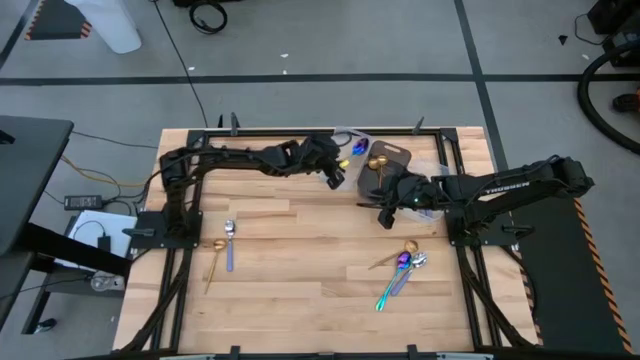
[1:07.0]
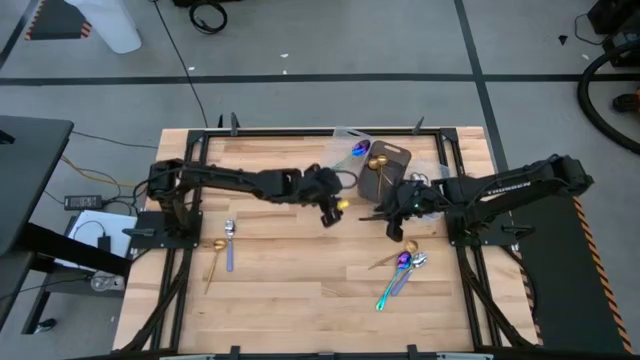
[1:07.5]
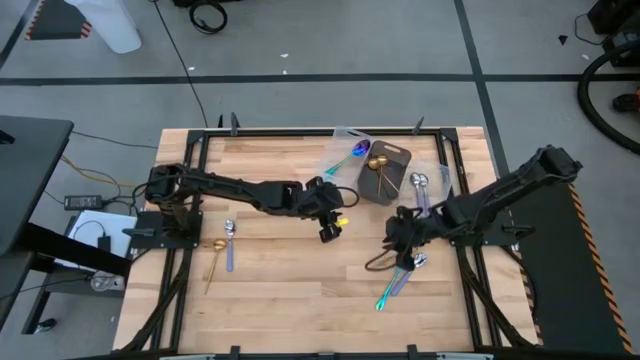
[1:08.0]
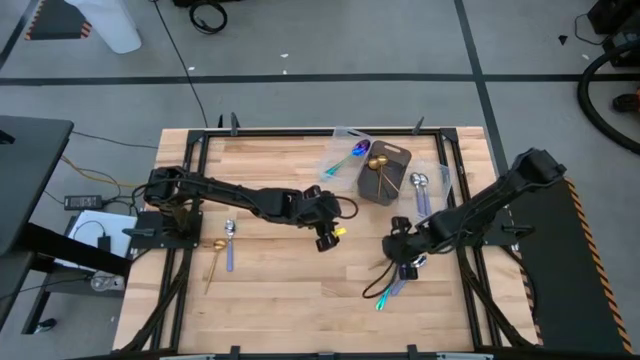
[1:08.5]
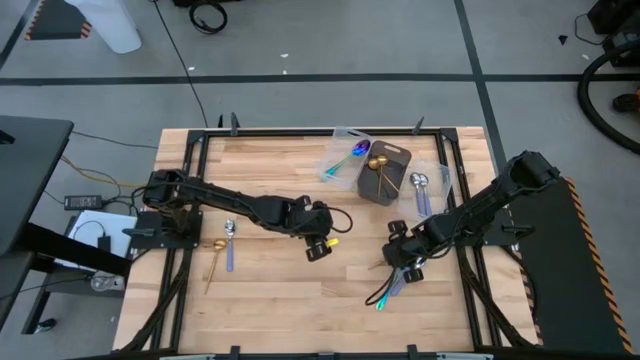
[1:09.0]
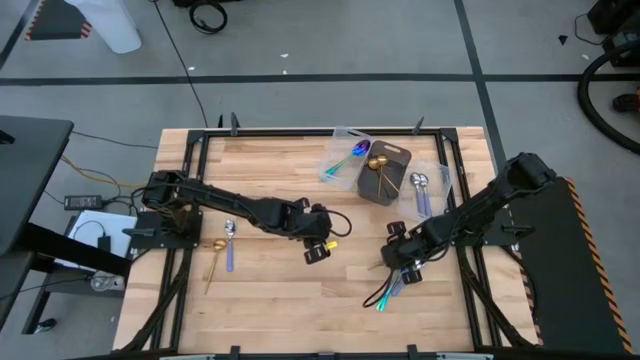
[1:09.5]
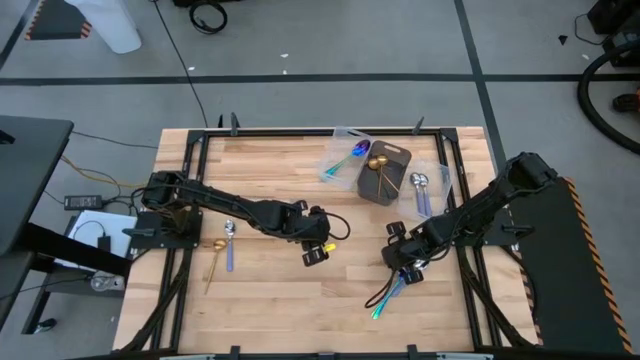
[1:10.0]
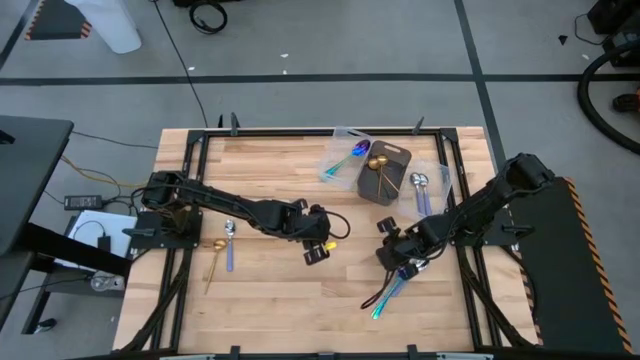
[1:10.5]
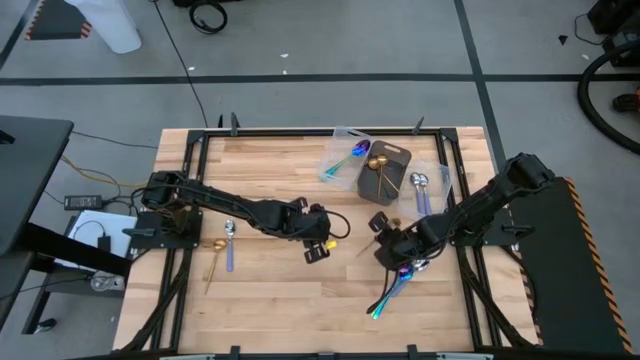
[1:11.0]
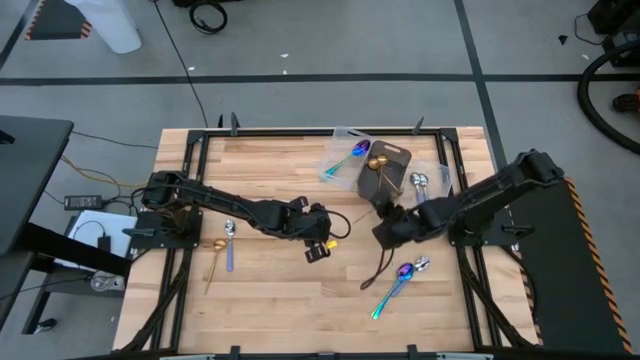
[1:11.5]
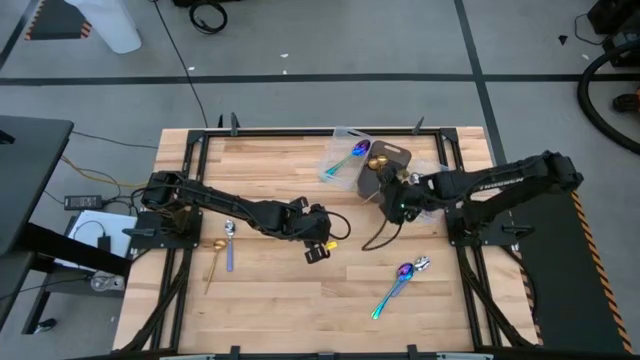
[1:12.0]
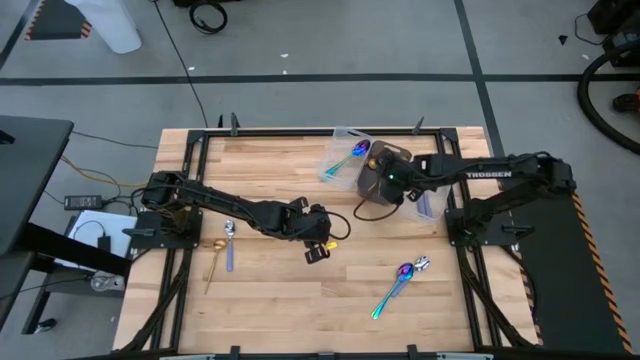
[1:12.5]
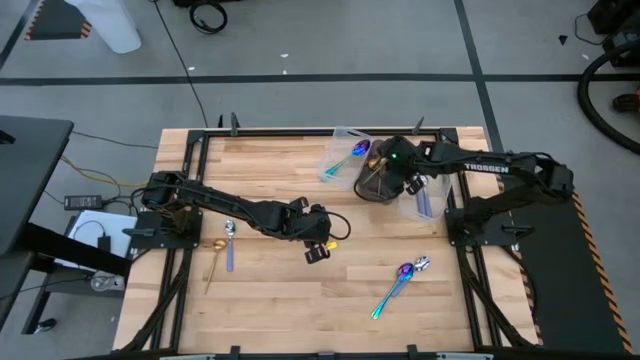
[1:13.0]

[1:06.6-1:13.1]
Task: Sort silverware by color (type)
Put the gold spoon into the black bin

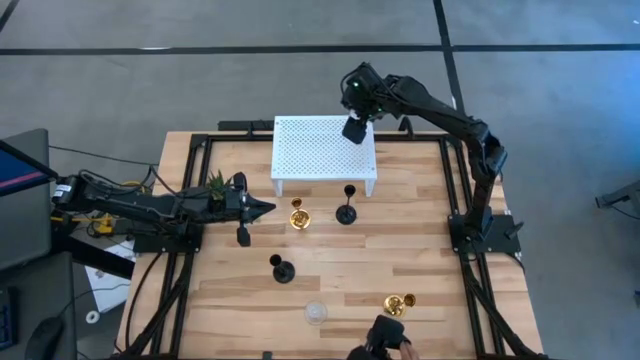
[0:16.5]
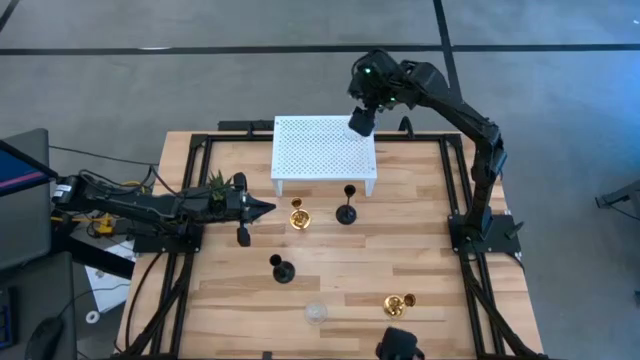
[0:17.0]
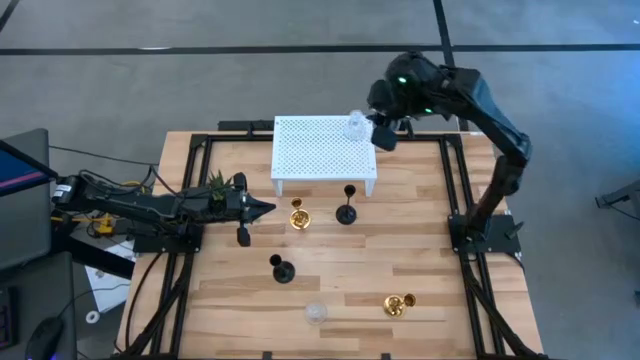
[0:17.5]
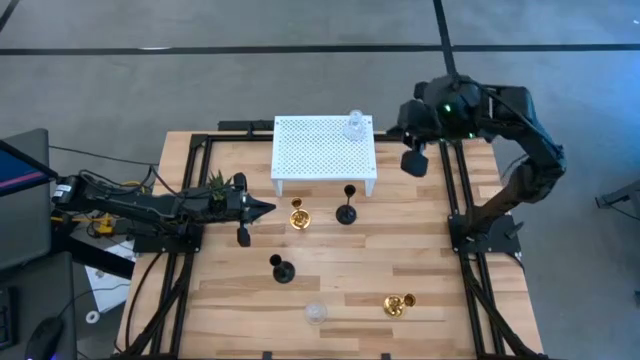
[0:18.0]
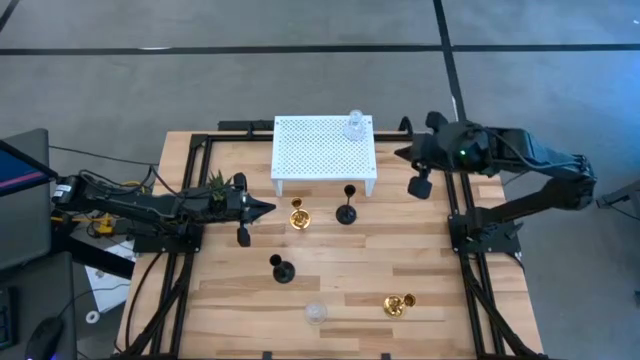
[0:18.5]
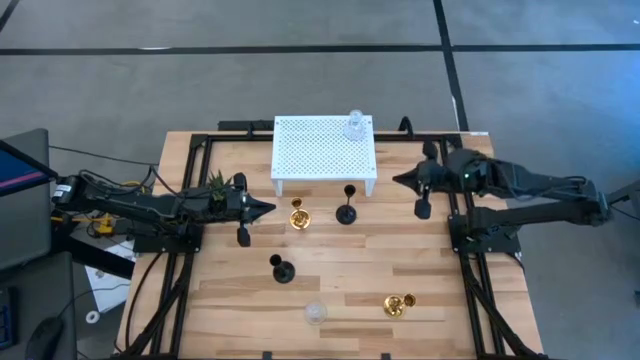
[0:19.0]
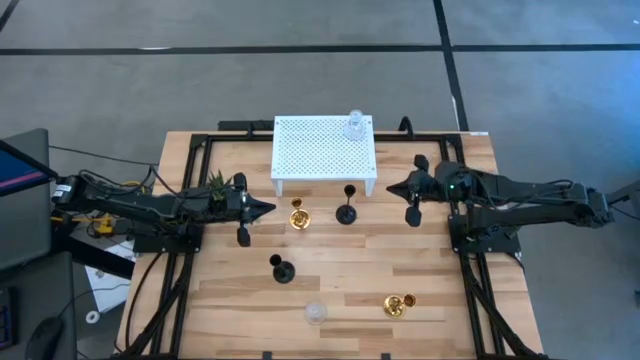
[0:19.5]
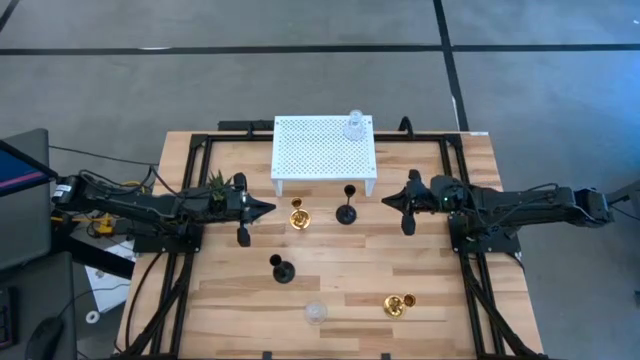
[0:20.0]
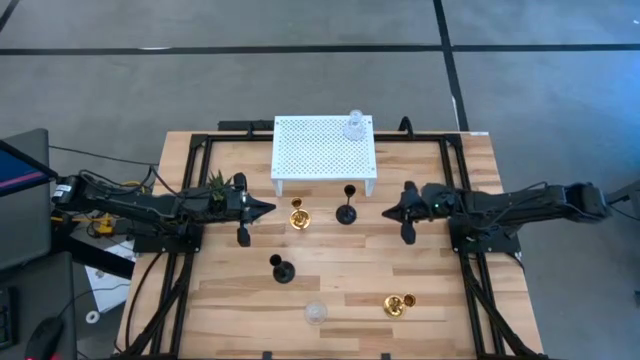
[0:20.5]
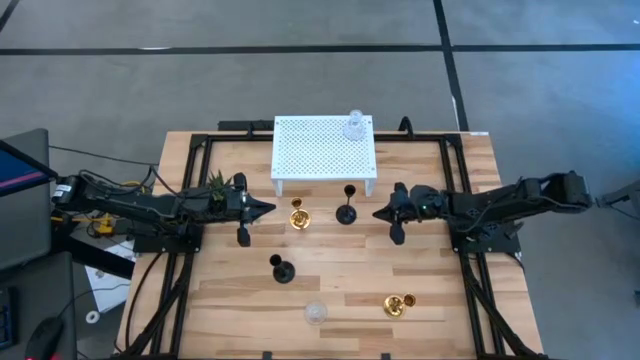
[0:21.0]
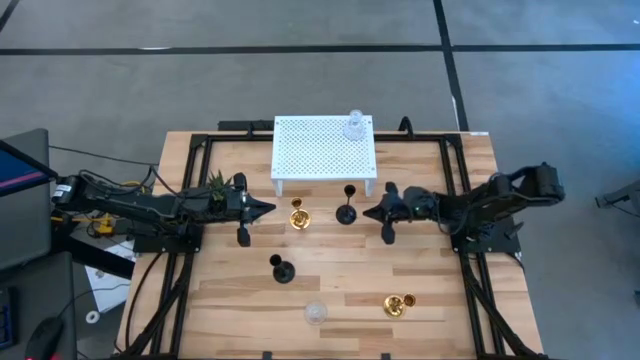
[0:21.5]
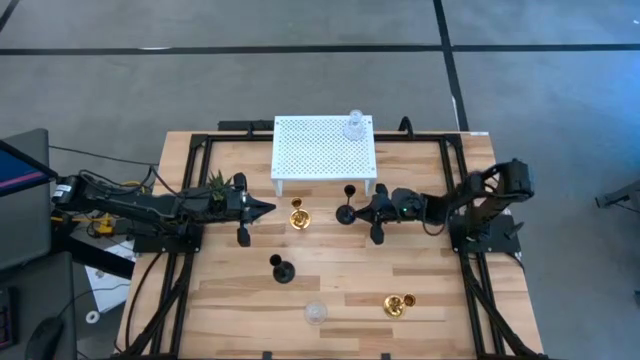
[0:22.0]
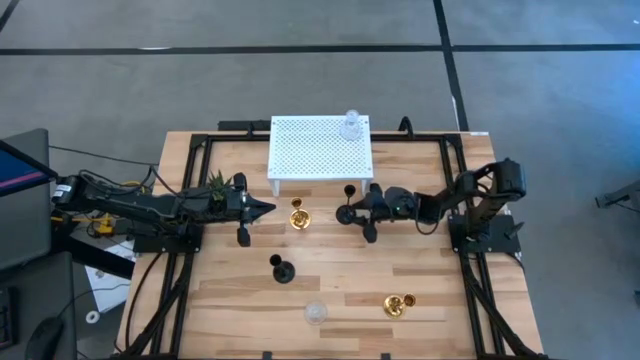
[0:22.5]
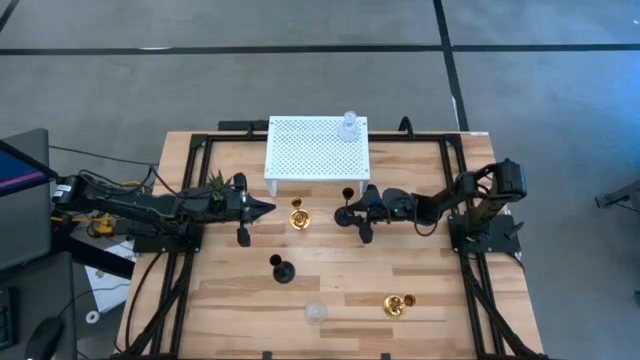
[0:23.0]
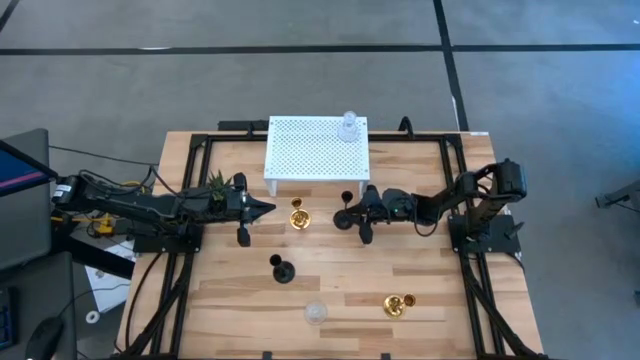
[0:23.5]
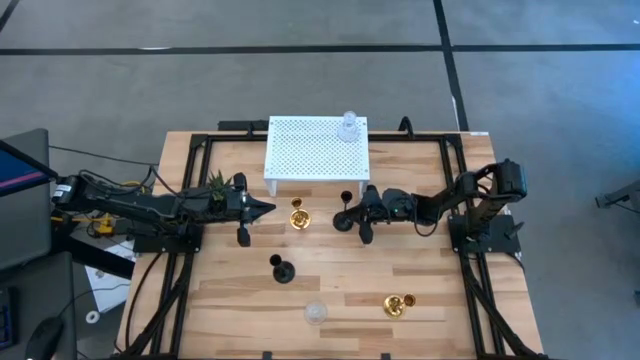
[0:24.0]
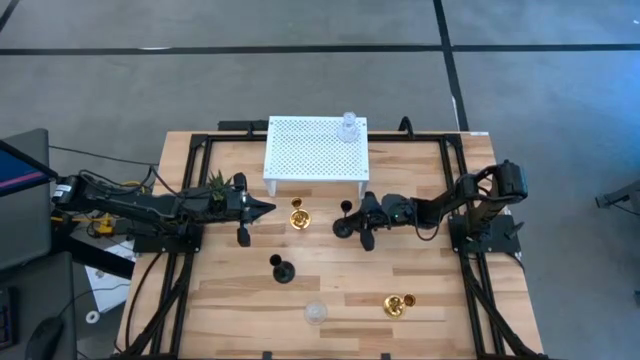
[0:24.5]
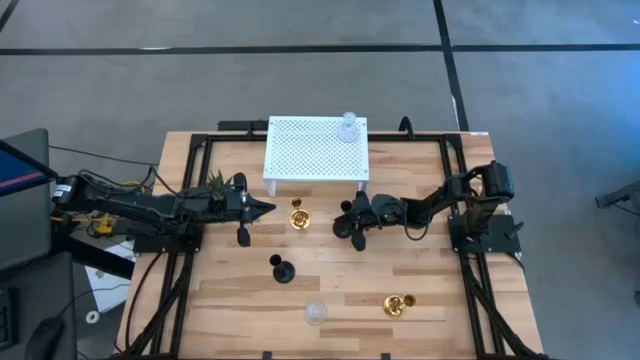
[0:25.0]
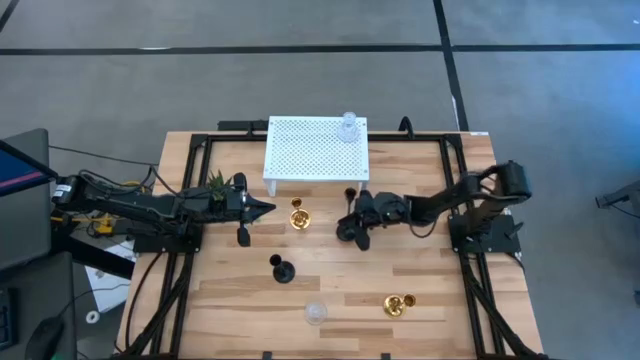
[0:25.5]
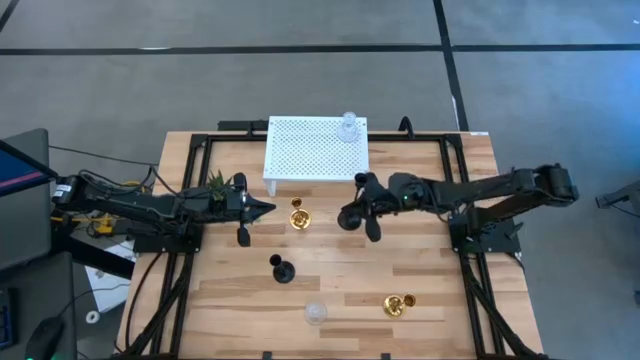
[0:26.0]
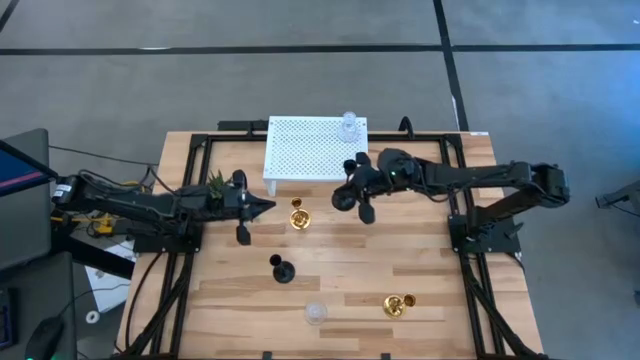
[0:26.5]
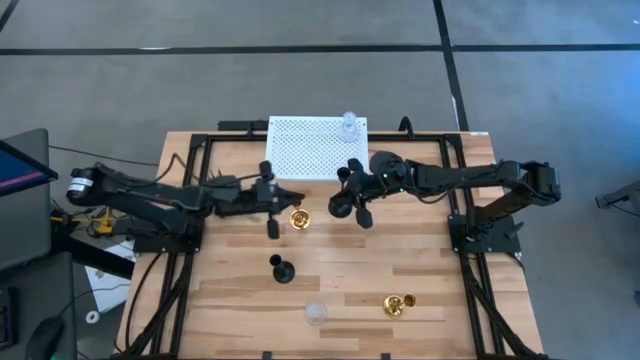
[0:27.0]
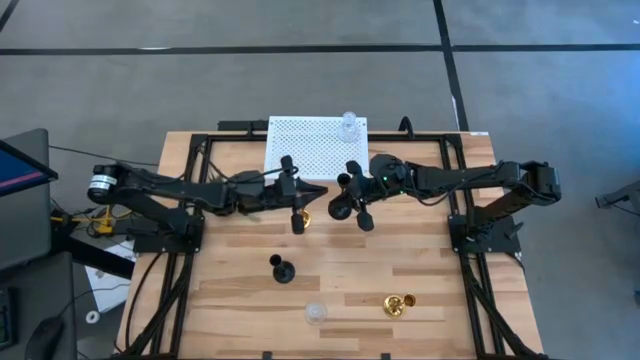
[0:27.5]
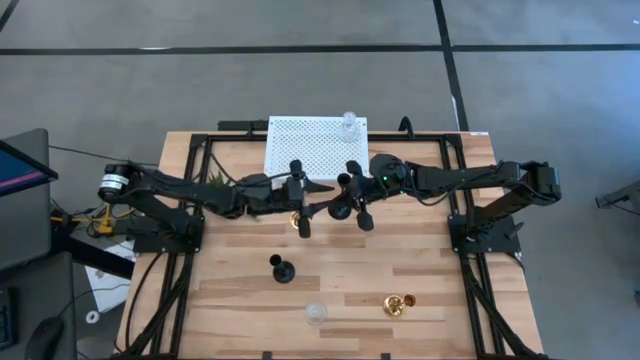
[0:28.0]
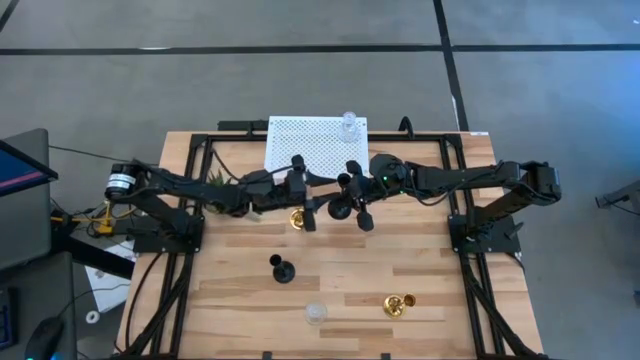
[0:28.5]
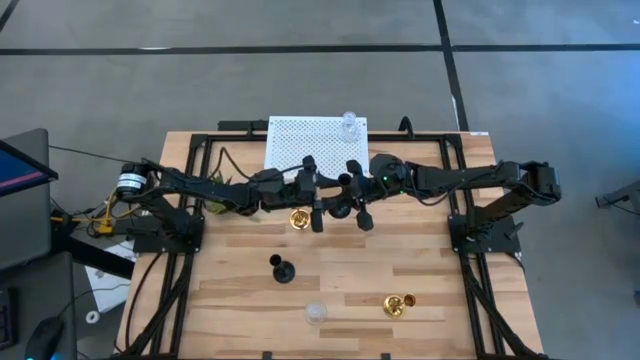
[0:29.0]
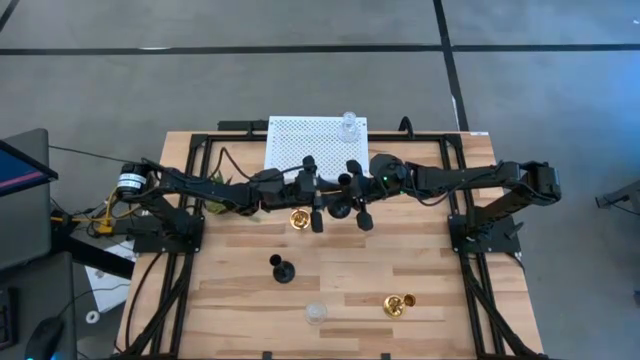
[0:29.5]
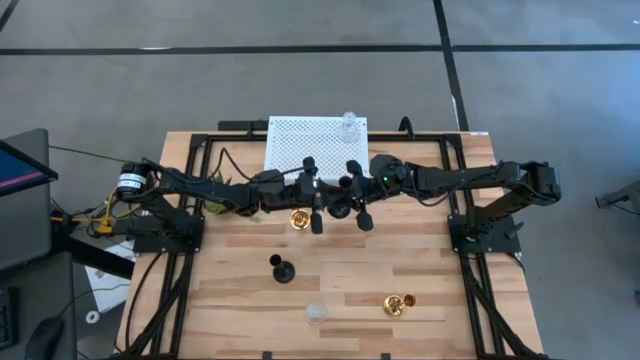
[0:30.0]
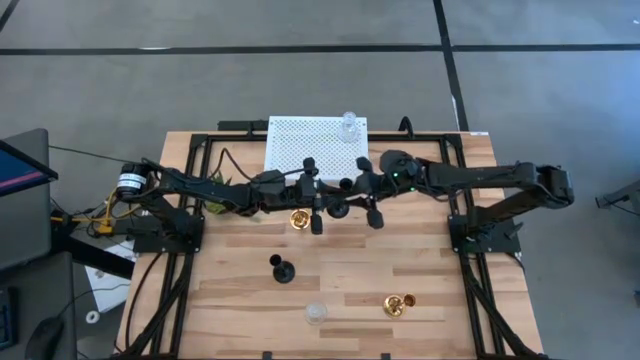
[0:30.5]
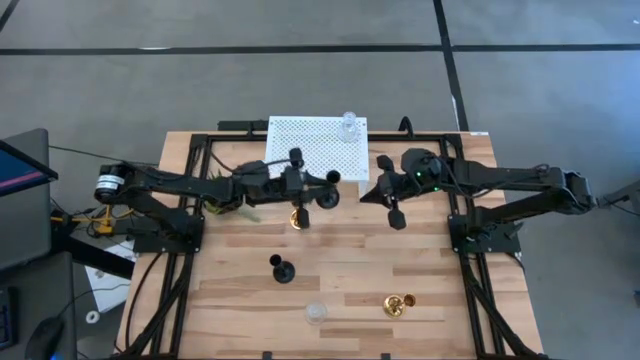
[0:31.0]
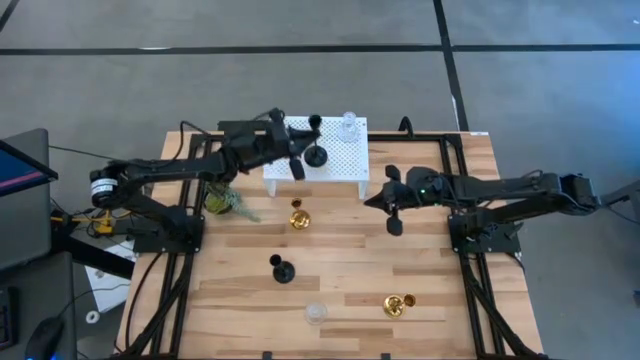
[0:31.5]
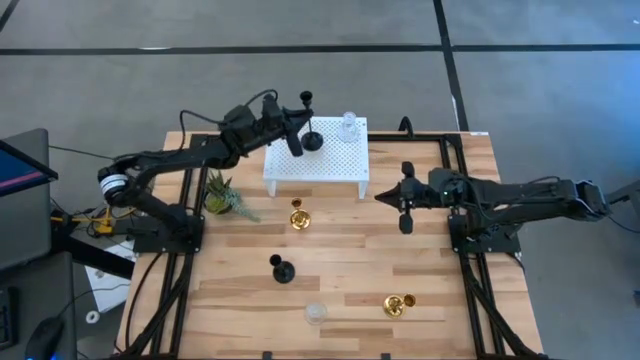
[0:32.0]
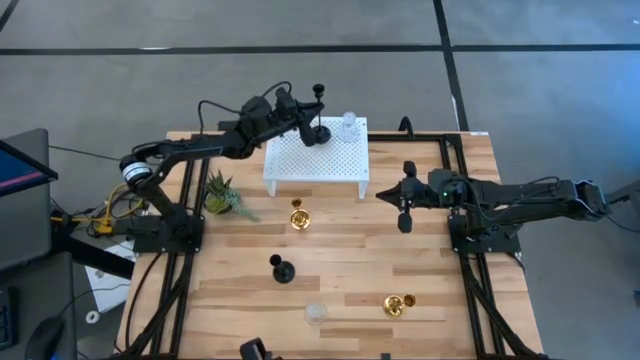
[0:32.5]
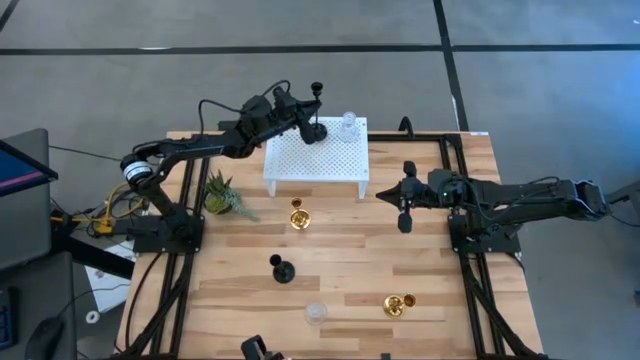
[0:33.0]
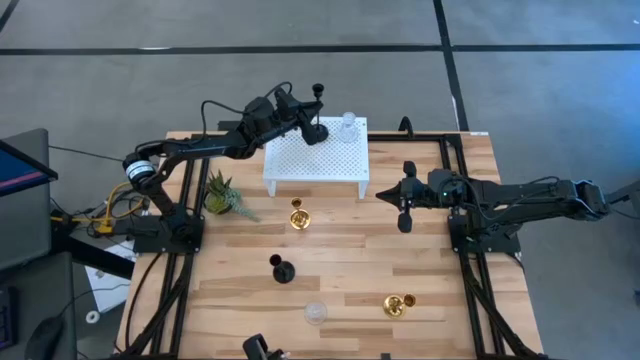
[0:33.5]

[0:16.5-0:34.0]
Task: Pick & Place candle stick holders
Put the top black metal candle stand on the shelf
